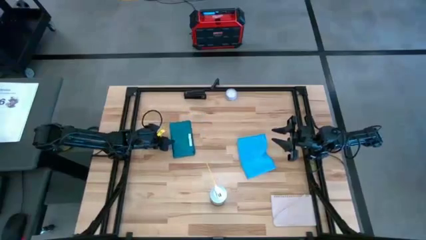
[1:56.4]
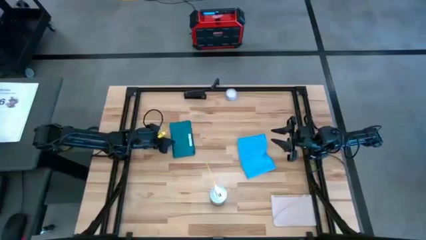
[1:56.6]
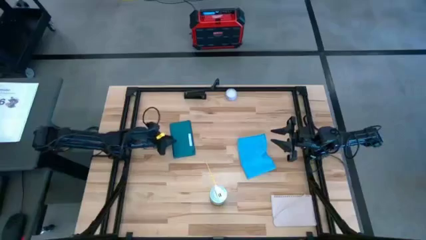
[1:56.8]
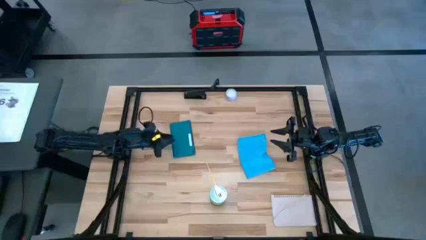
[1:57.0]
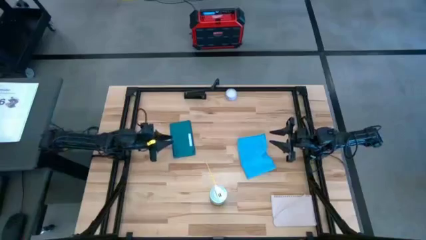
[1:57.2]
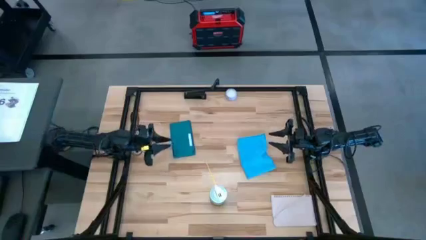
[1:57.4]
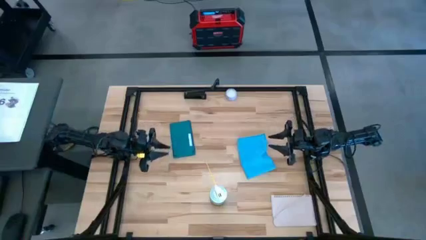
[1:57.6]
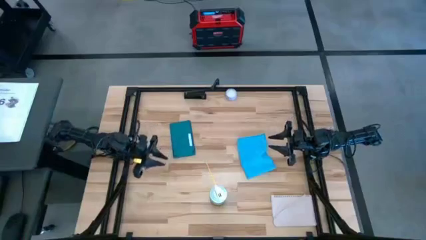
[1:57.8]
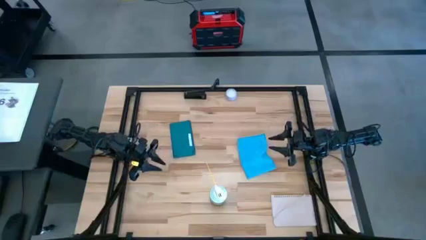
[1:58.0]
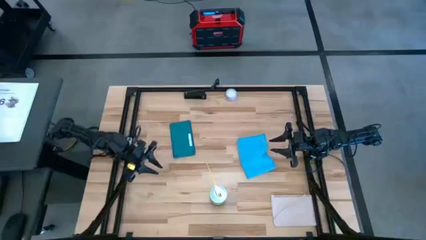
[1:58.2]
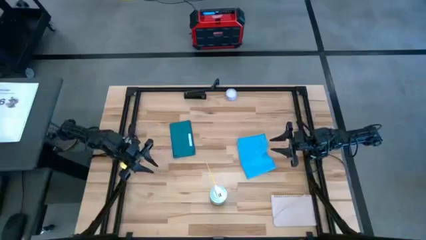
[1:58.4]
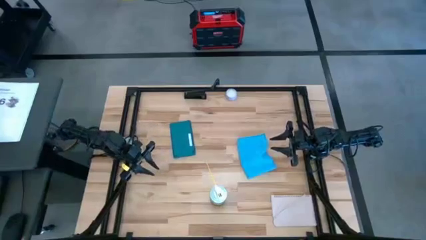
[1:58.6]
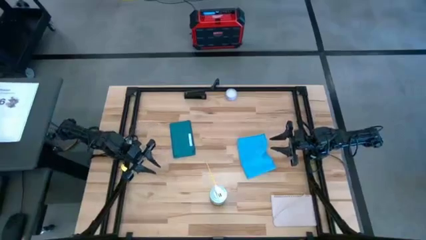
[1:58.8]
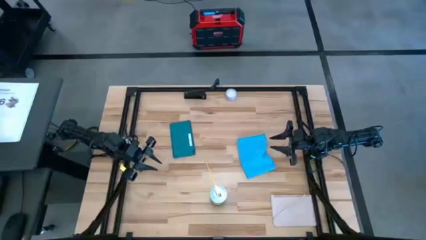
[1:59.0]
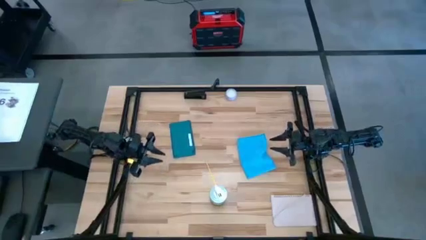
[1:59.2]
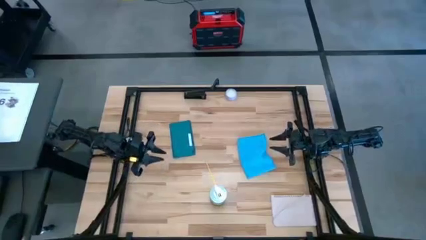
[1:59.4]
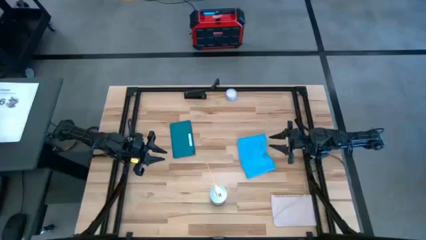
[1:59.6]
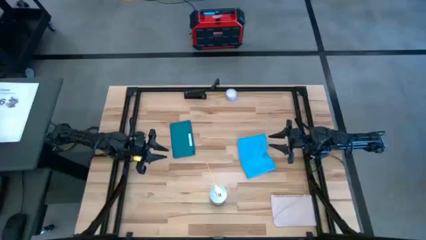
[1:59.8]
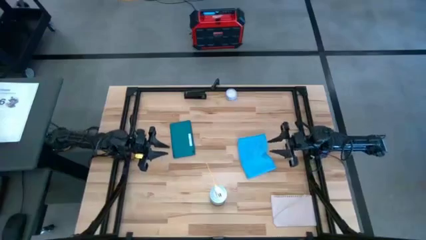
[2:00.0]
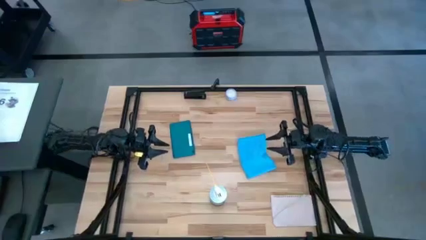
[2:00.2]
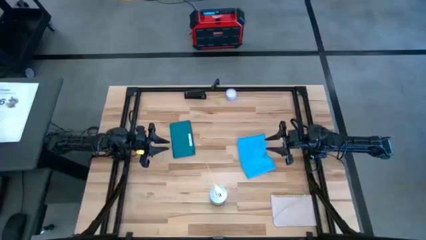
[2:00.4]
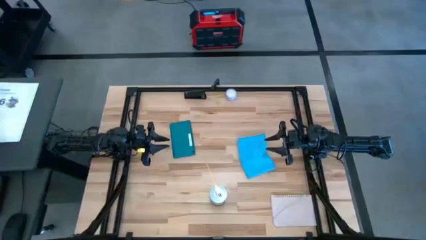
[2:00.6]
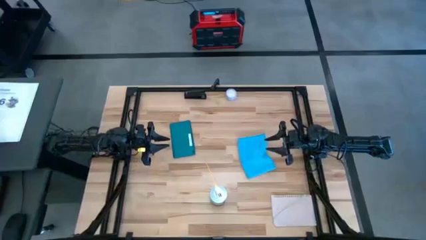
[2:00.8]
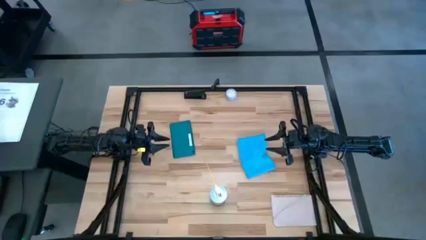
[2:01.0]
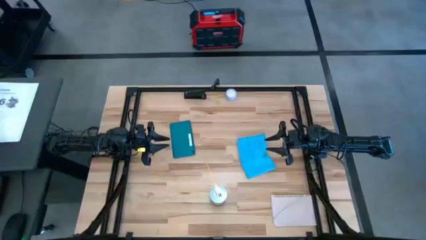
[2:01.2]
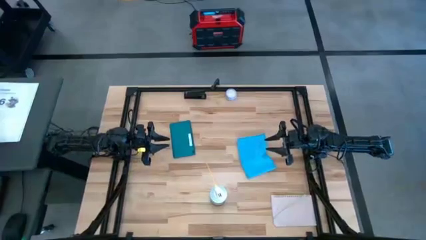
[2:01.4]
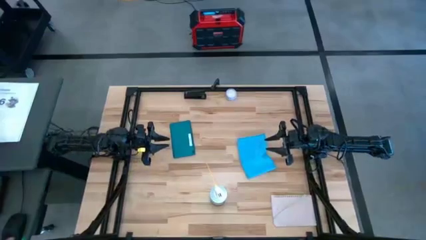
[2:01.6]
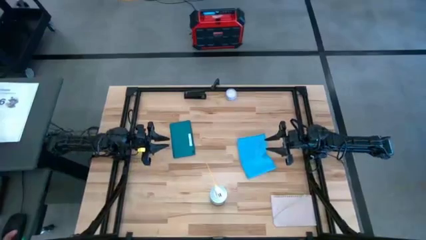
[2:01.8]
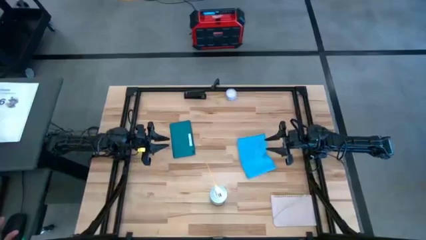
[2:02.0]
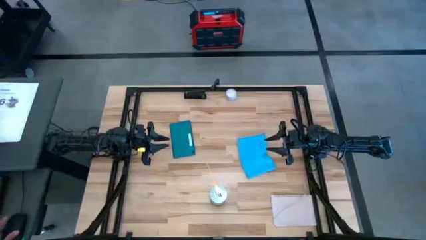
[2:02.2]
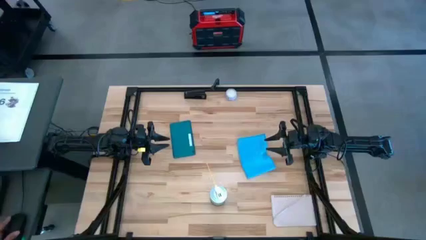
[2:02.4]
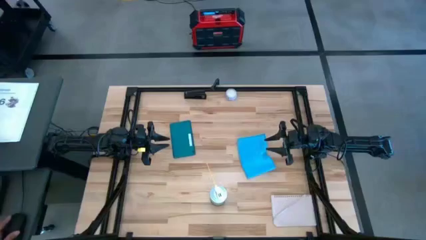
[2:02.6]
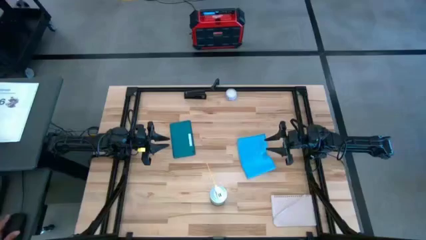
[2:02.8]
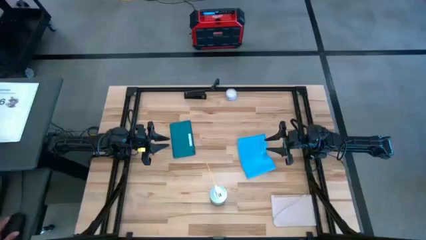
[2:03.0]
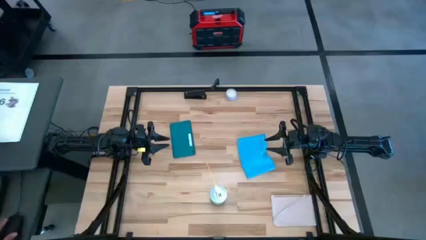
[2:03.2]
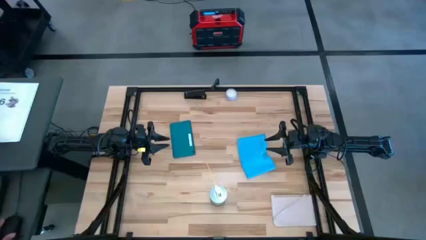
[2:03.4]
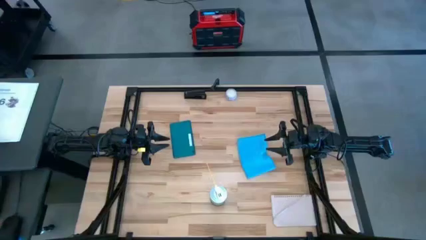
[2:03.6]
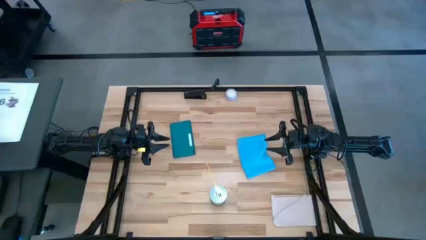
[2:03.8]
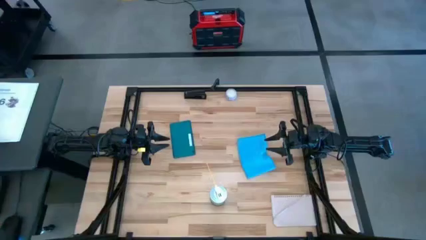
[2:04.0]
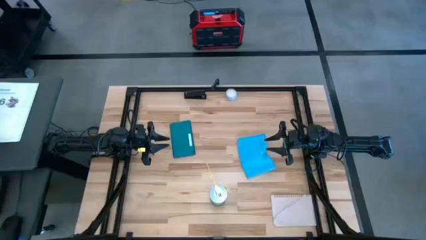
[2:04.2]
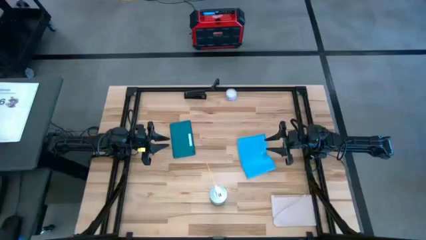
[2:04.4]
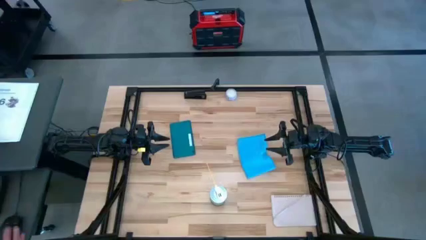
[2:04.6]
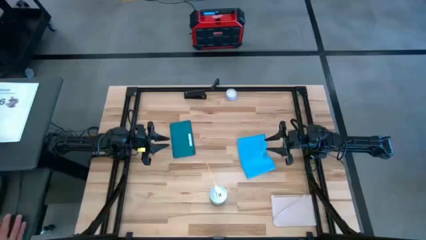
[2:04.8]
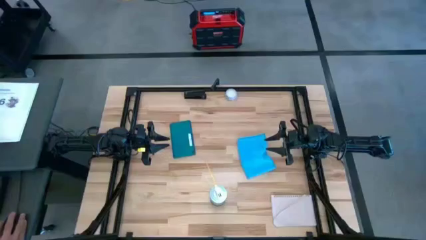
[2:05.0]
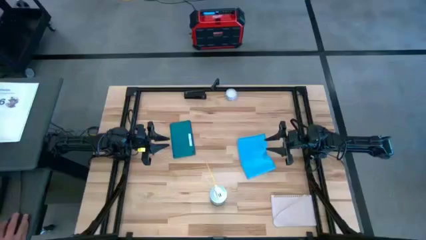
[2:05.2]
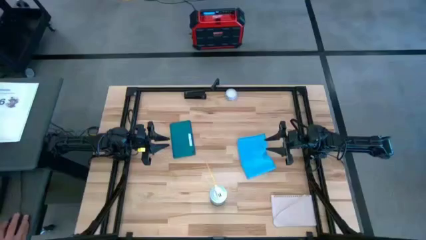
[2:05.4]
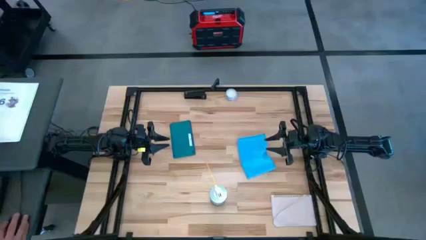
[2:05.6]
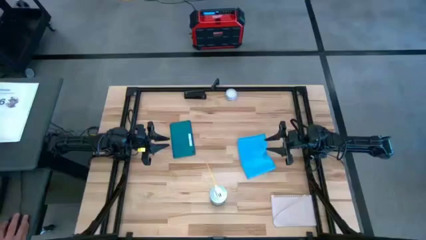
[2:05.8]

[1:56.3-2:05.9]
Task: Apply microfiber cloth
Return to Home Position

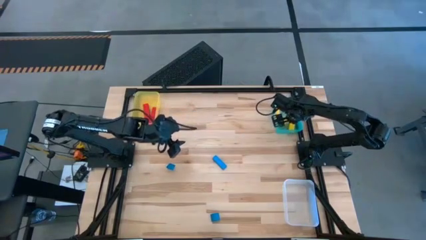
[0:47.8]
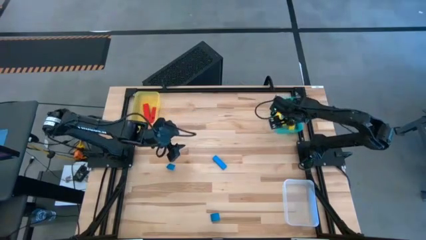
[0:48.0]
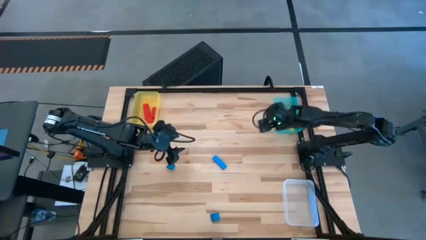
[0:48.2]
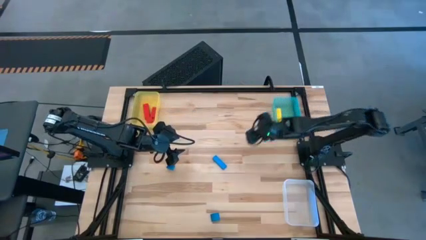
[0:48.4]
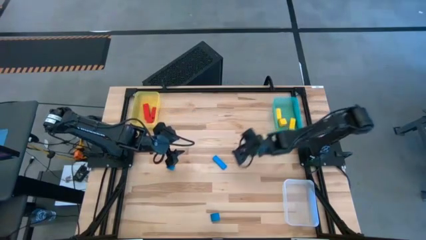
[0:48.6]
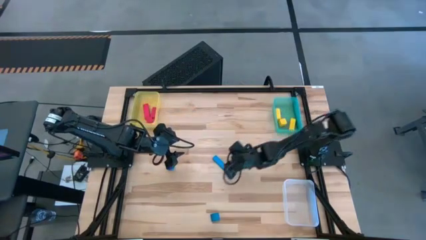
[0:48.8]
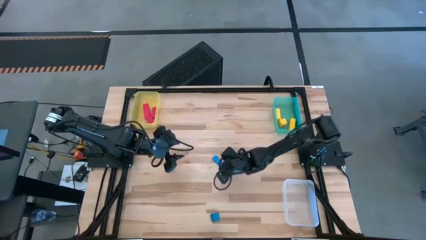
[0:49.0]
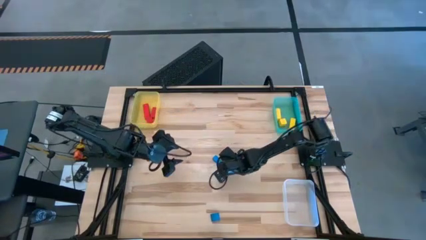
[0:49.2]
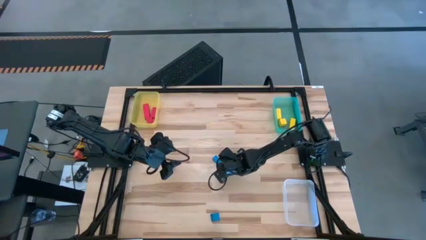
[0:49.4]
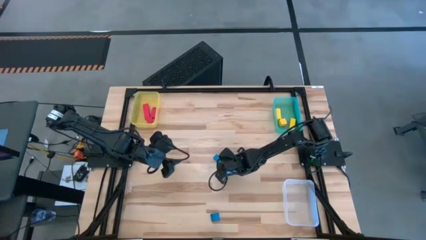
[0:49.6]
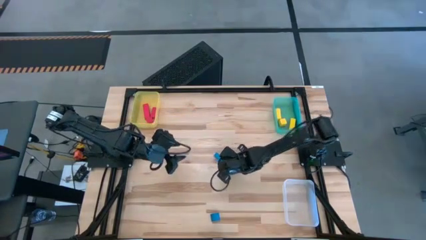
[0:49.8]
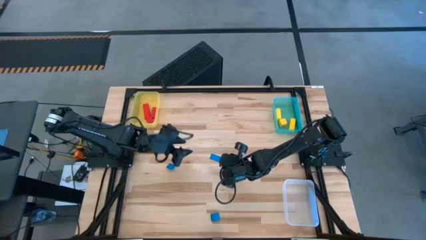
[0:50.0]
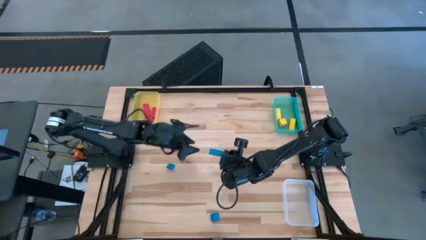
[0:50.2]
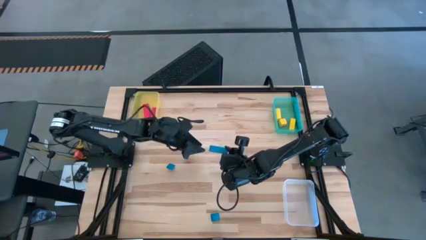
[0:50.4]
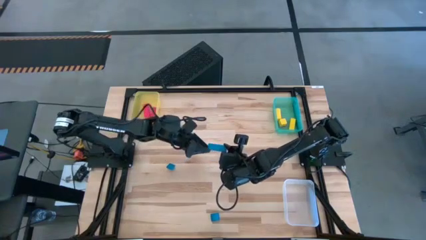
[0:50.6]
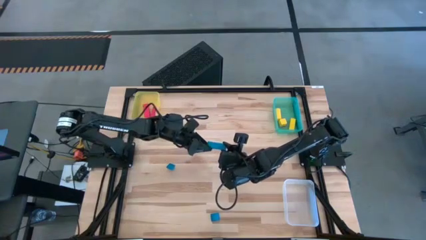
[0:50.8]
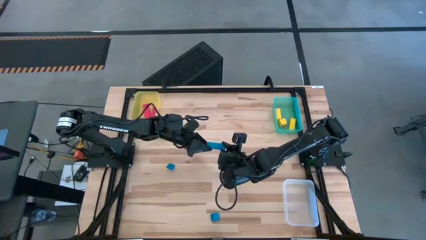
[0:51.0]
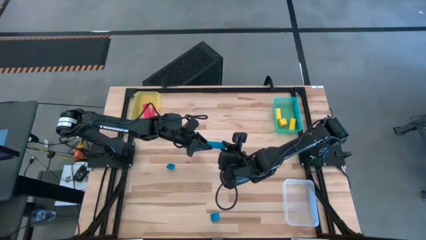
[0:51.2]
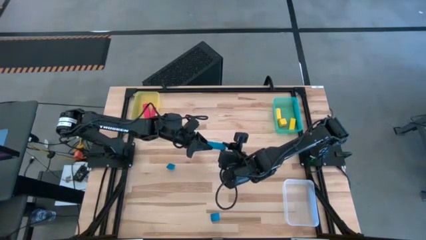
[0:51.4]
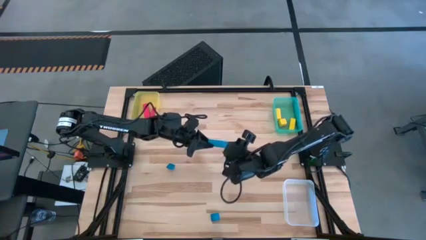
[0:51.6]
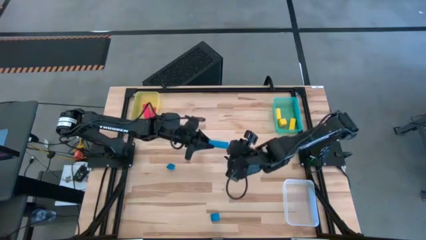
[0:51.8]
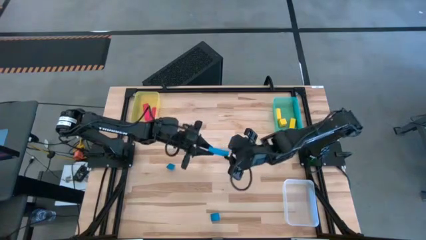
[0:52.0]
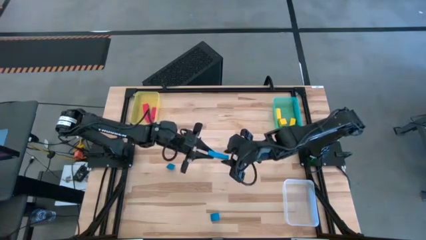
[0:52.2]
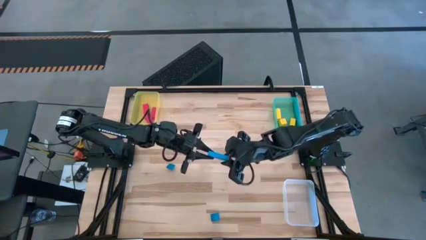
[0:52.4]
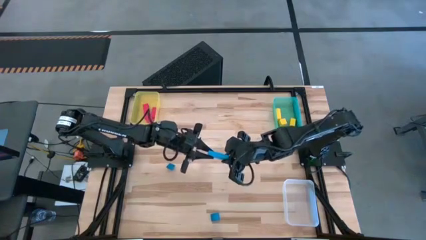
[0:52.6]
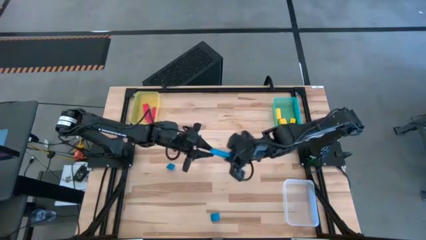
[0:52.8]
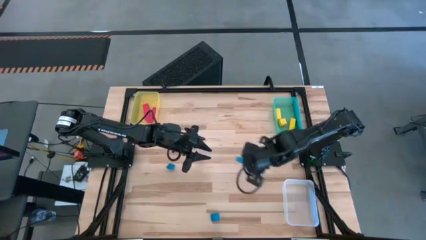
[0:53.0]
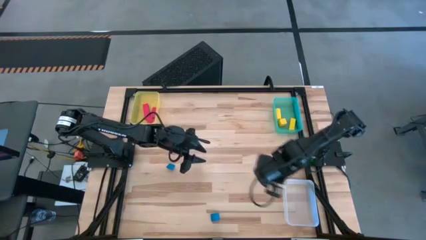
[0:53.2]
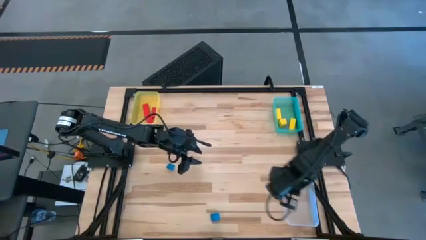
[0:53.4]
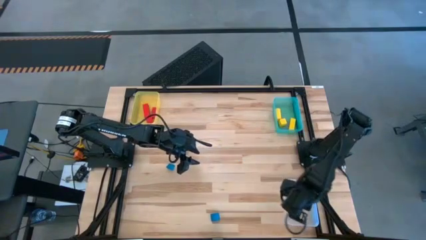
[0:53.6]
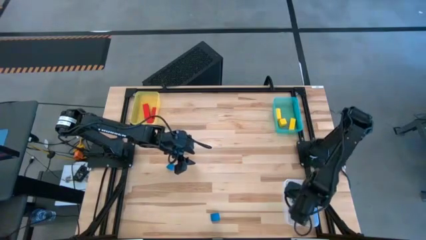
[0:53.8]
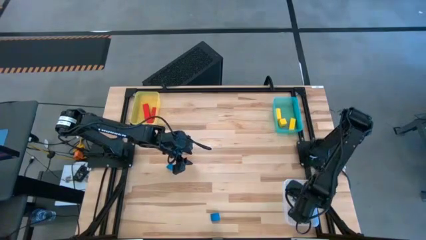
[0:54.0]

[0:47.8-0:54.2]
Task: Sort & place blocks by color
Put the top right blue block into the transparent bin
